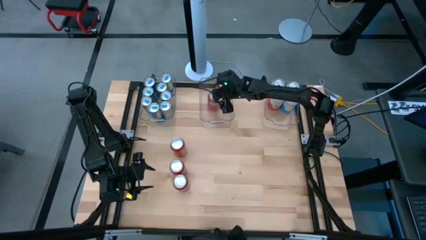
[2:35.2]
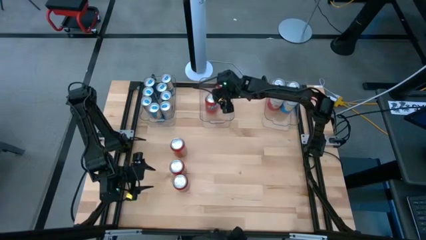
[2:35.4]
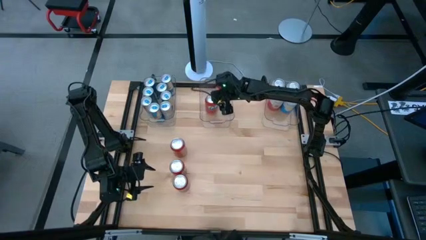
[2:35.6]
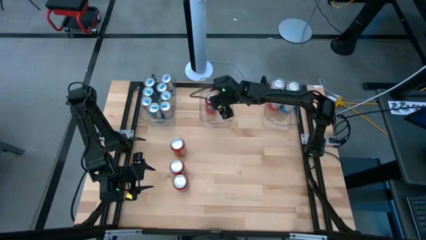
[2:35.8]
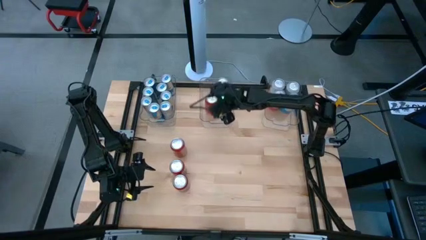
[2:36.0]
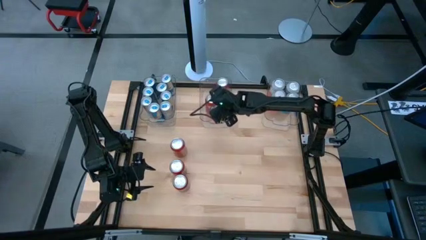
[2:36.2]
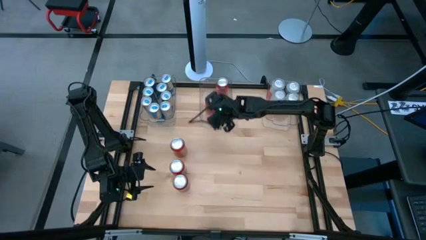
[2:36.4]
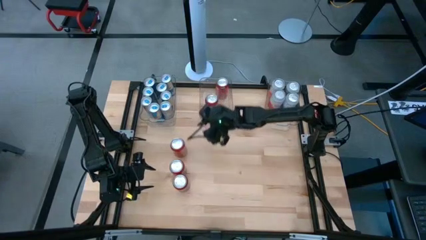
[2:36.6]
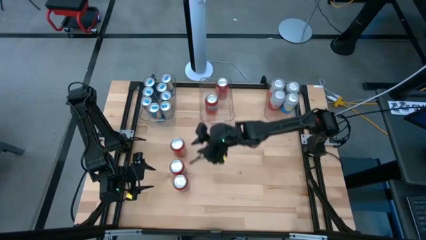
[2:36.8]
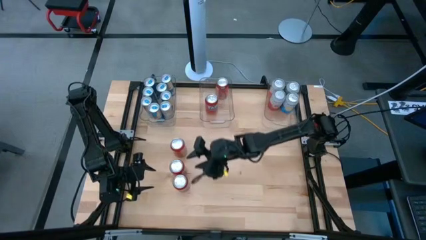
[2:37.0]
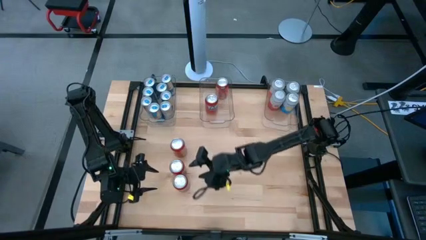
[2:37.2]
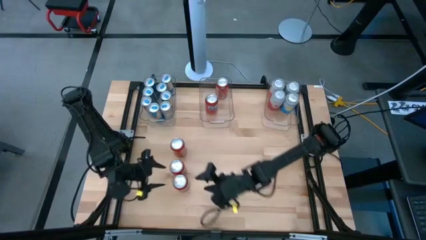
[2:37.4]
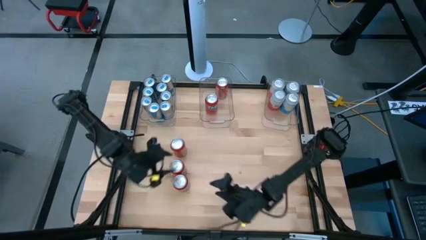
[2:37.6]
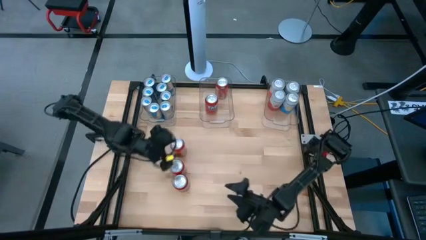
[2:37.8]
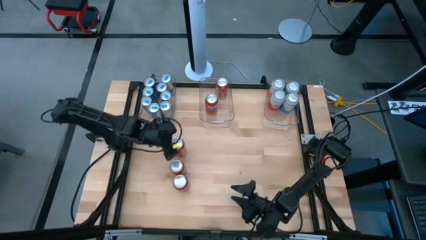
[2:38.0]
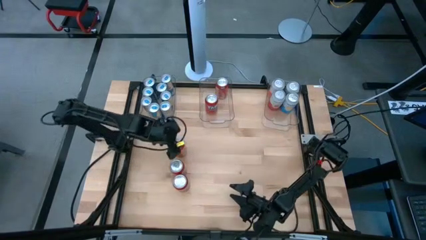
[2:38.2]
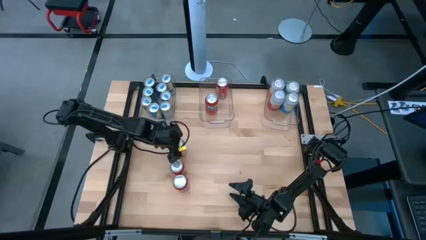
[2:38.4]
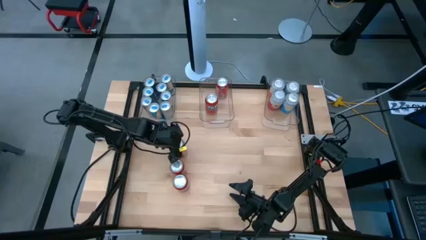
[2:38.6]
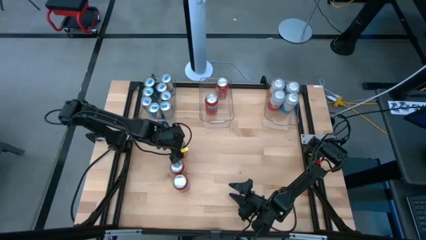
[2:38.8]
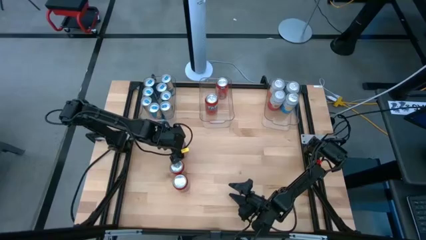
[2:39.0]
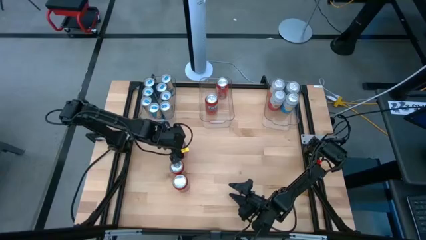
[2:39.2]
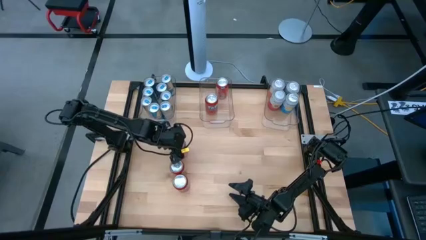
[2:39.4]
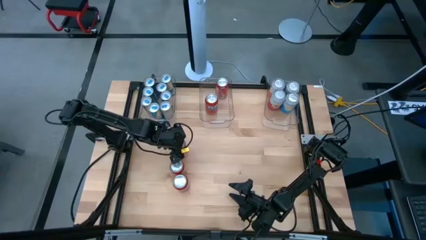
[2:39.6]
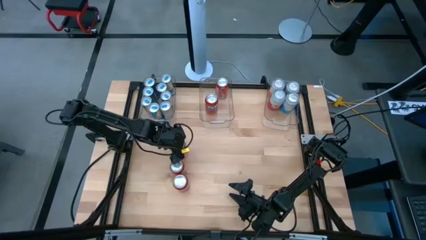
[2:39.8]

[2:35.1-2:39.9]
Task: Sort soda cans
Put the red soda can into the center transparent bin

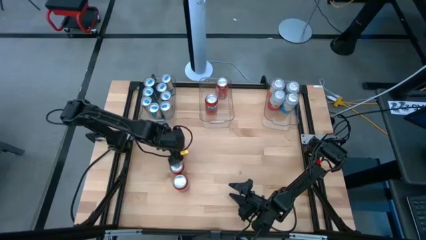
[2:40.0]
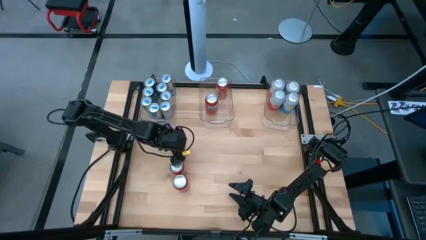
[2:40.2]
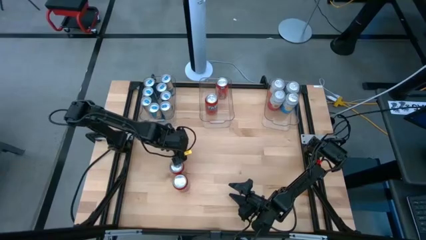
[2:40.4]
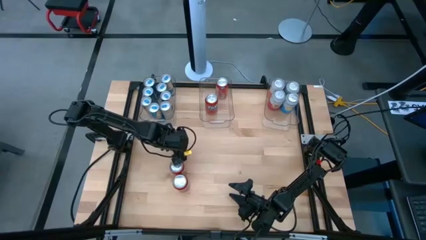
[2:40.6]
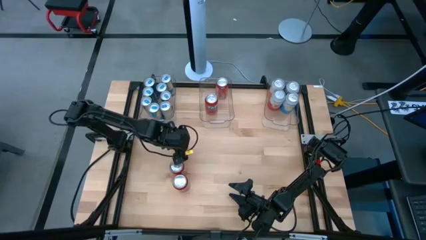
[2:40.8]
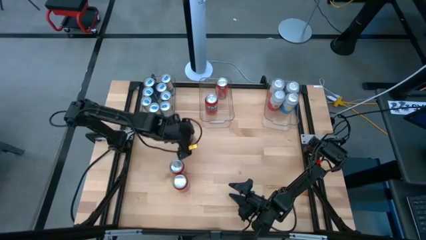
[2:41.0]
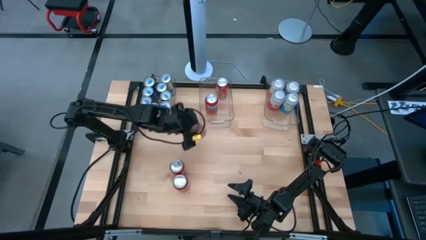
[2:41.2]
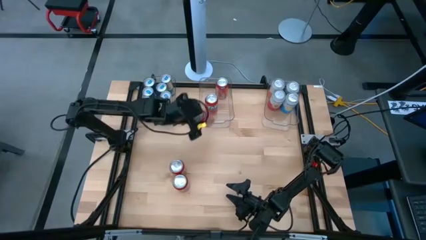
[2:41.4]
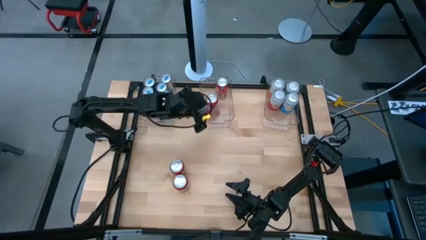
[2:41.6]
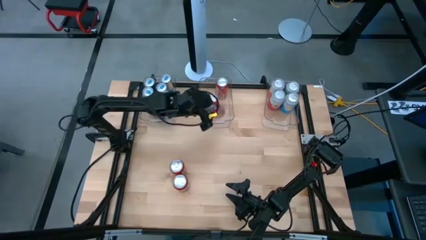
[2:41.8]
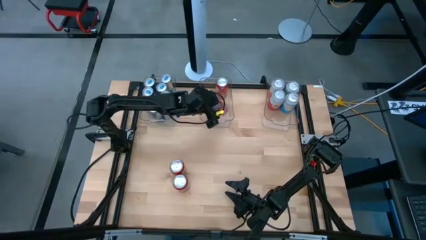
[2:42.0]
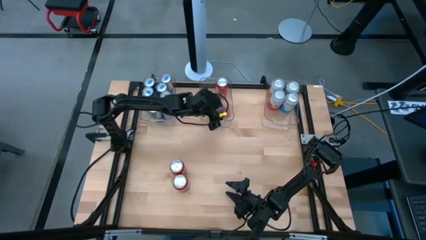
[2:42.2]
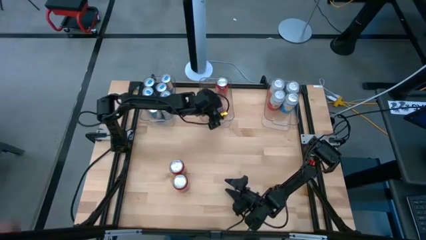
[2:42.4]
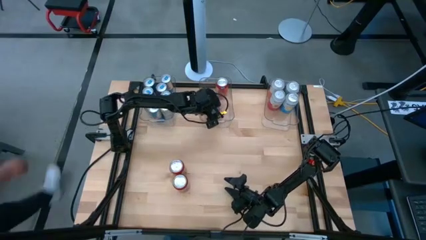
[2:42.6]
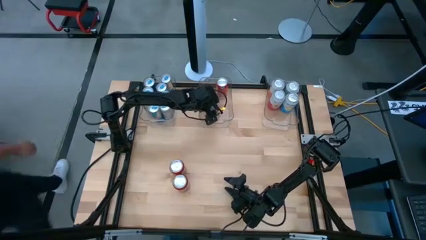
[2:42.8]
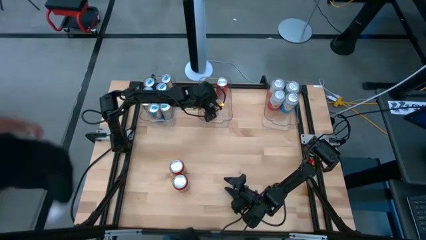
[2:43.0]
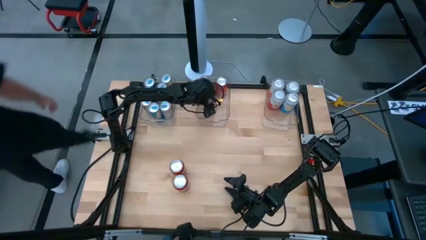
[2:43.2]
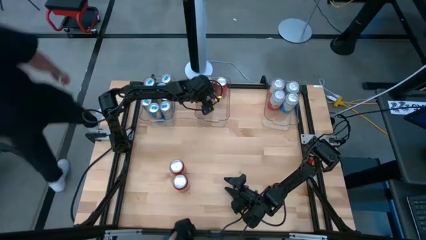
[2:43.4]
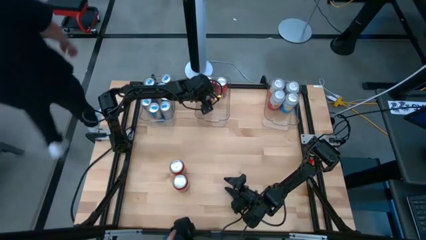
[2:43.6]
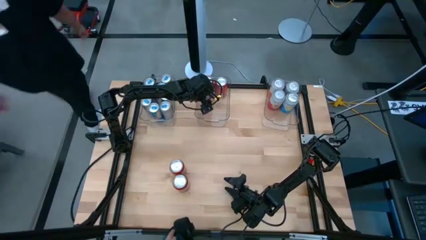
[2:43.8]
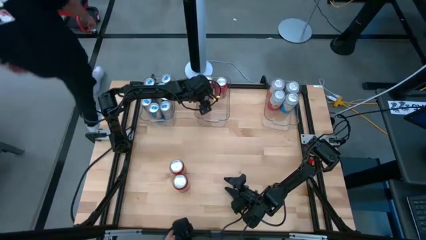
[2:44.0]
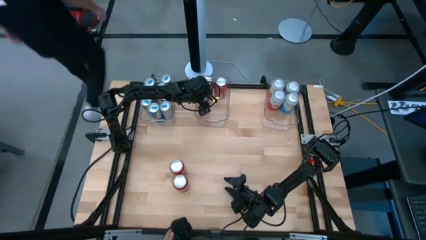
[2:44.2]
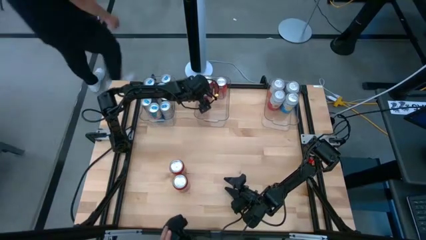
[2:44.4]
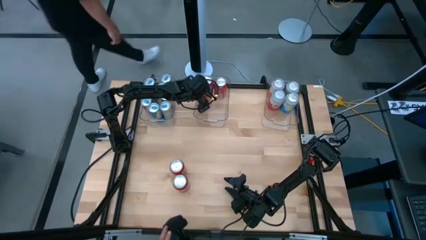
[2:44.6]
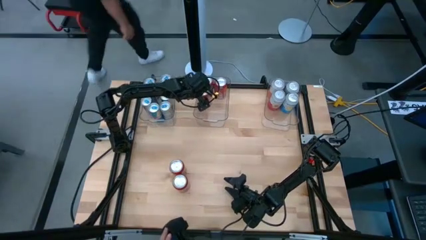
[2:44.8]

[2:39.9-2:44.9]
Put the red soda can into the center transparent bin

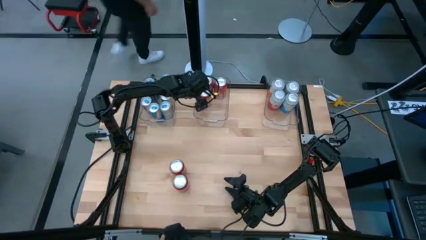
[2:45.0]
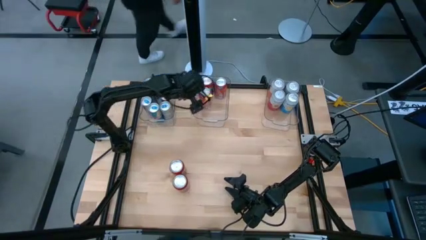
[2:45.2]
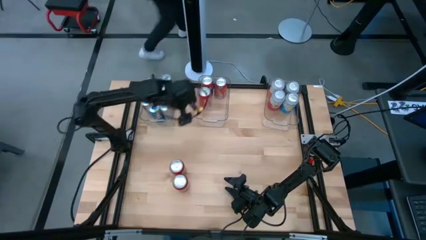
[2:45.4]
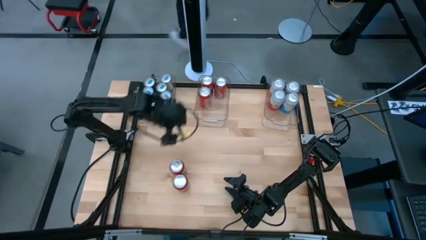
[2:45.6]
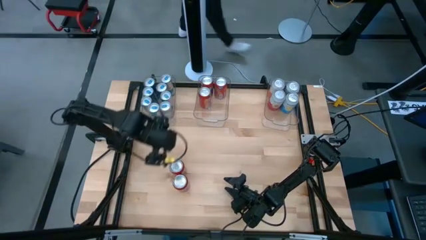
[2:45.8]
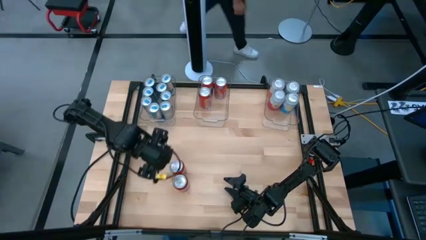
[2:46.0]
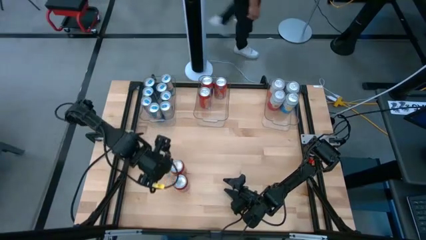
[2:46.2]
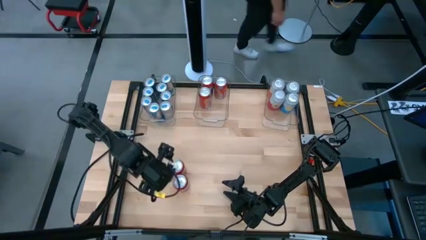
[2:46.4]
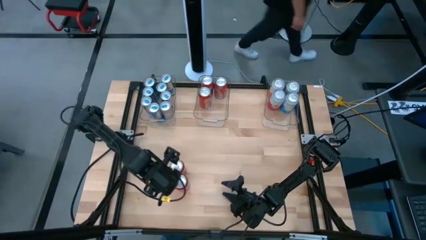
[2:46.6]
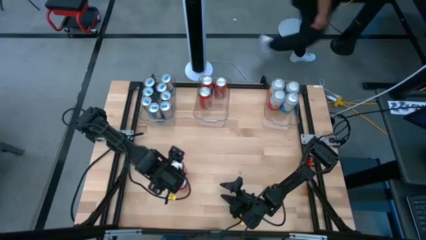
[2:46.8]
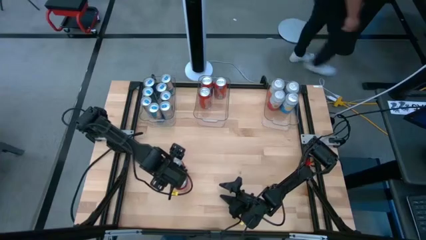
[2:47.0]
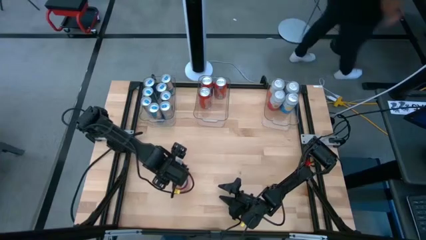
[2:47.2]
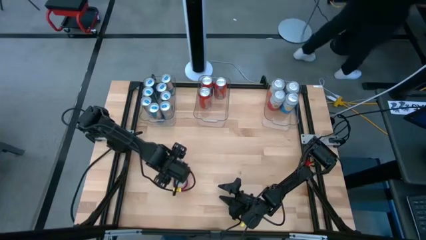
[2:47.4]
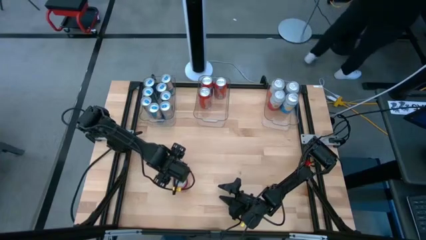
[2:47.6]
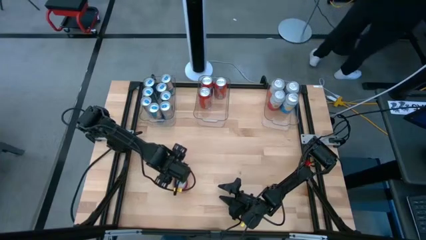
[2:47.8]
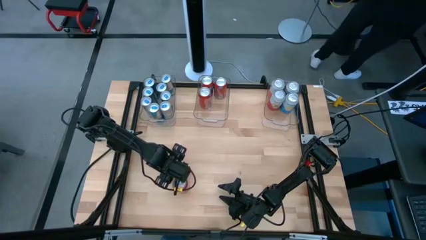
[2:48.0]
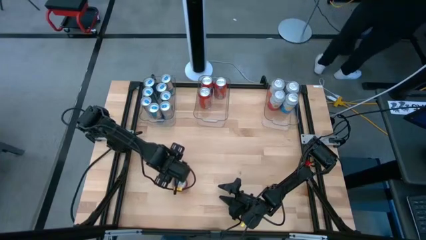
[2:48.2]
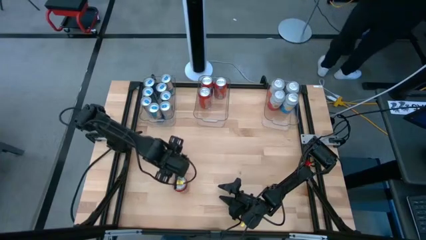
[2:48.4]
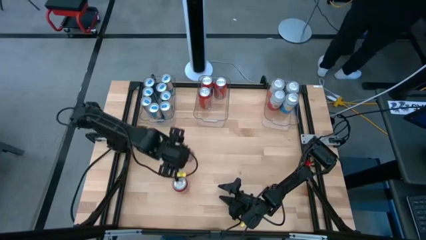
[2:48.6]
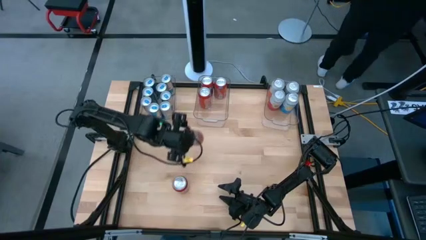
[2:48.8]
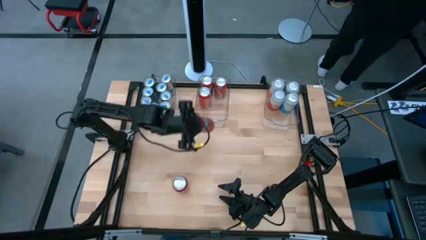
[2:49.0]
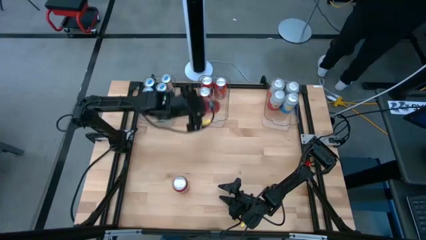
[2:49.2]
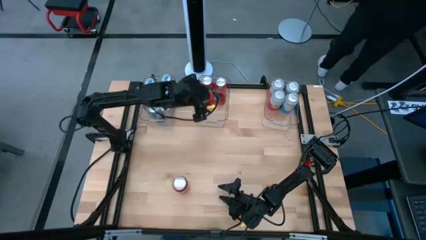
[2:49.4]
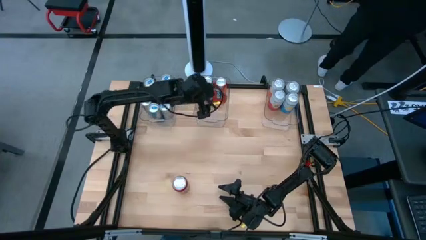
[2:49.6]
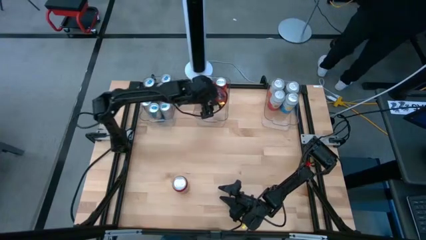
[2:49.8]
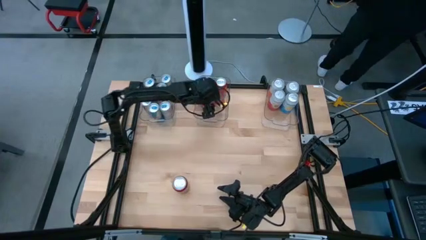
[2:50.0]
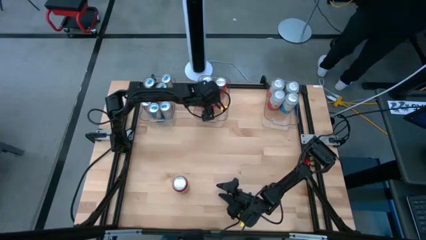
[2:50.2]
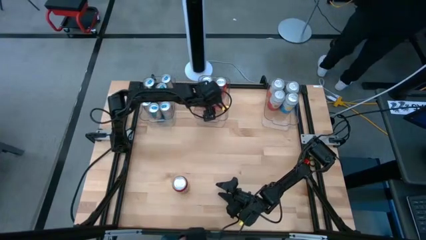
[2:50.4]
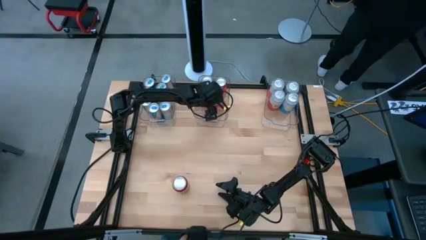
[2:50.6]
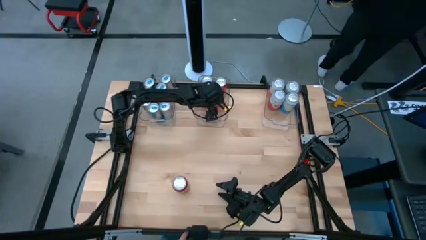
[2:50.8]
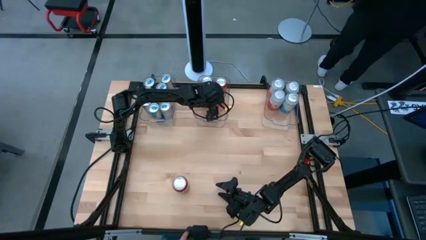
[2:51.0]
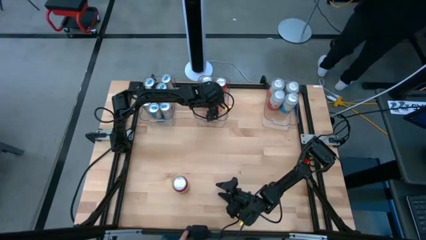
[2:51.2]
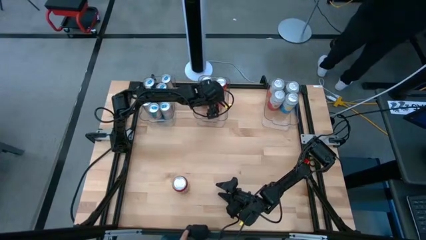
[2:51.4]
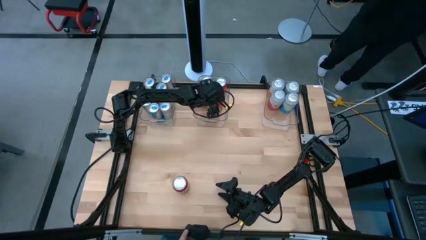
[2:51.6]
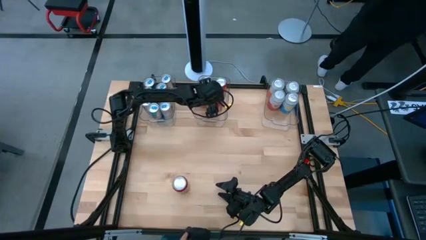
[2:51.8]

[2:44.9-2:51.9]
Put the red soda can into the center transparent bin
